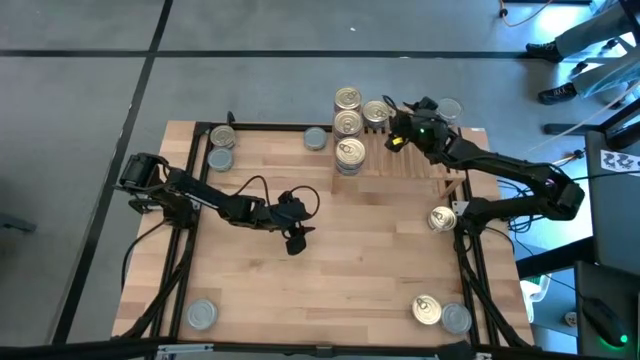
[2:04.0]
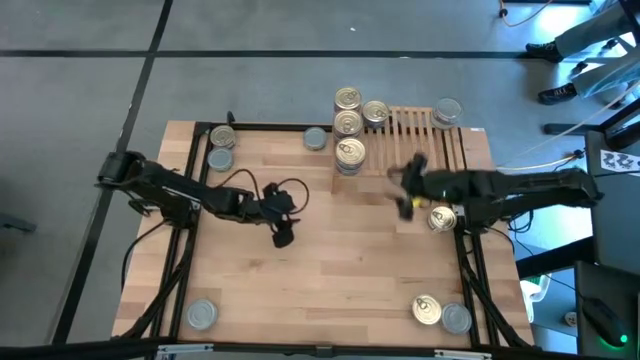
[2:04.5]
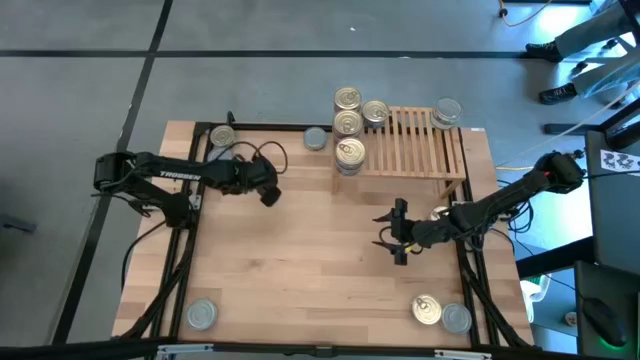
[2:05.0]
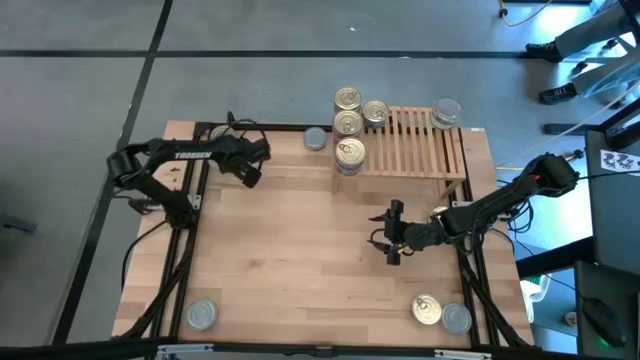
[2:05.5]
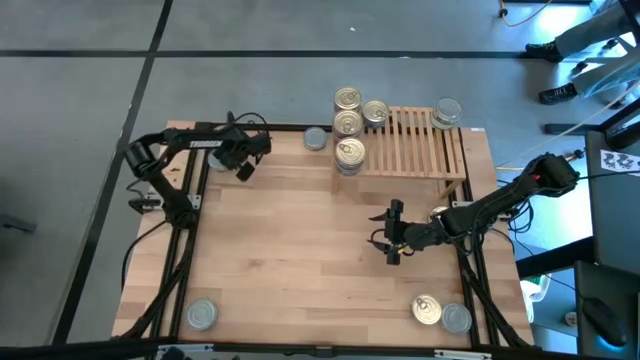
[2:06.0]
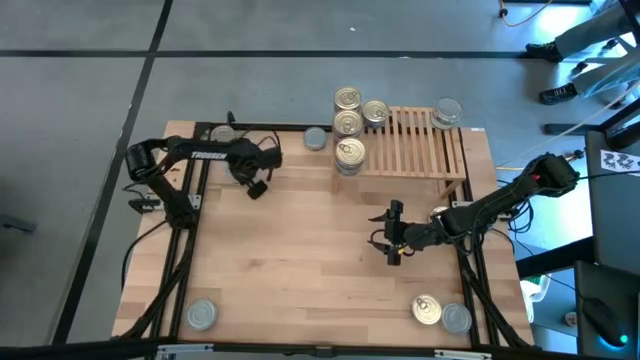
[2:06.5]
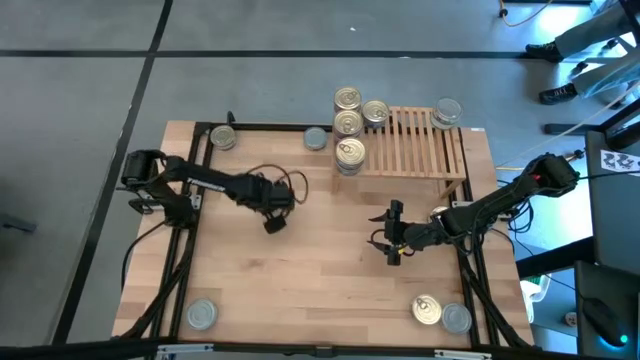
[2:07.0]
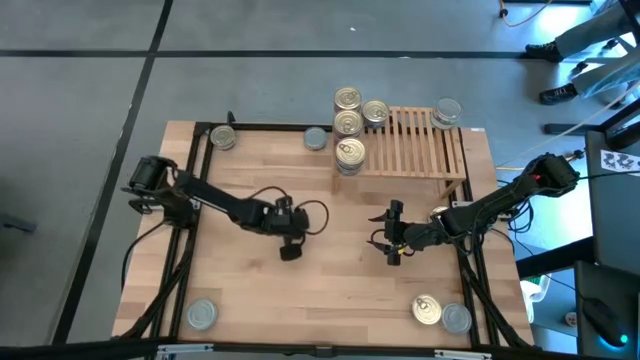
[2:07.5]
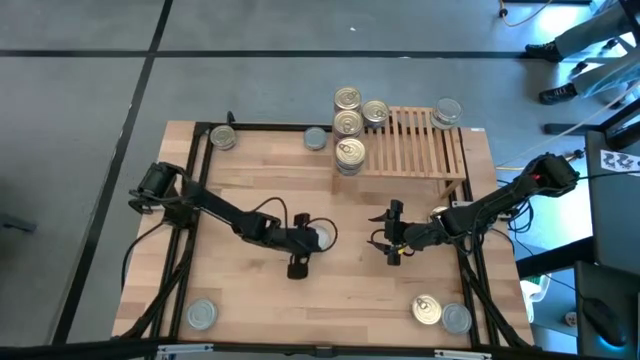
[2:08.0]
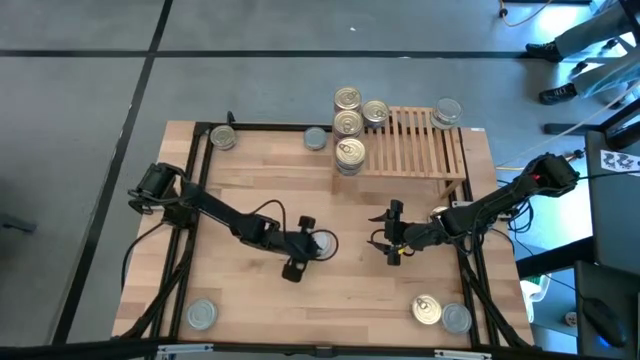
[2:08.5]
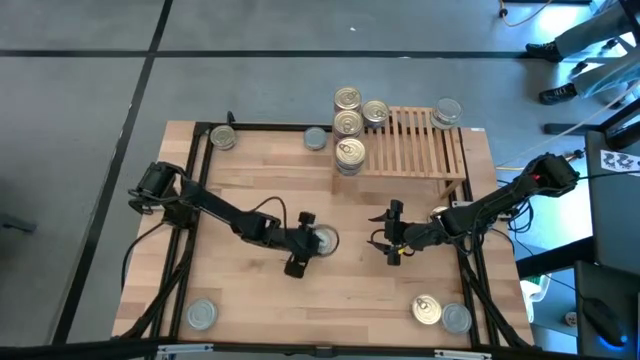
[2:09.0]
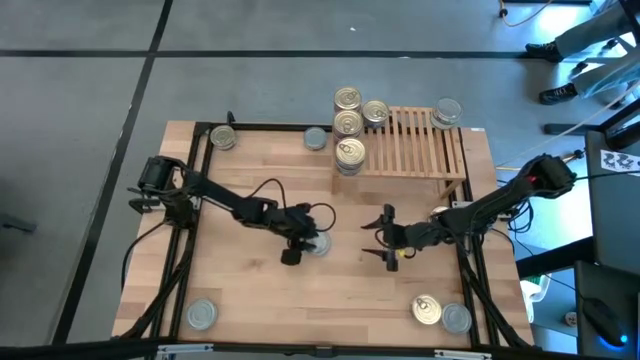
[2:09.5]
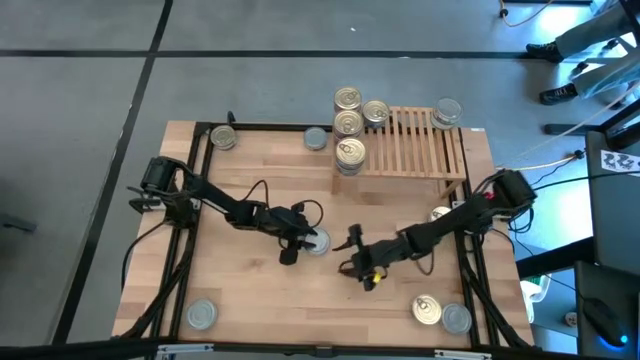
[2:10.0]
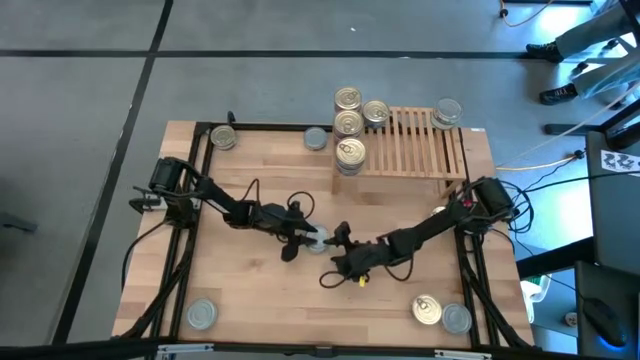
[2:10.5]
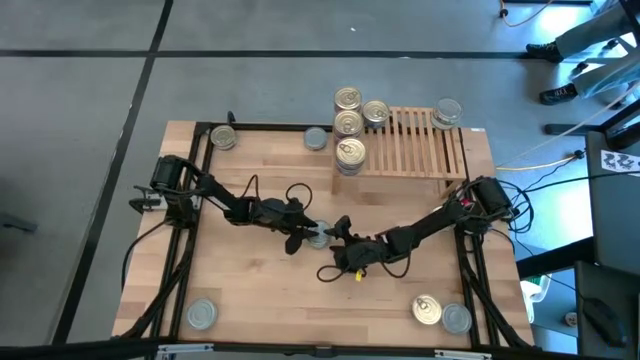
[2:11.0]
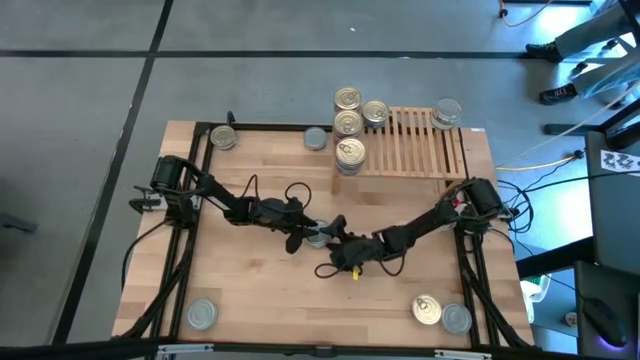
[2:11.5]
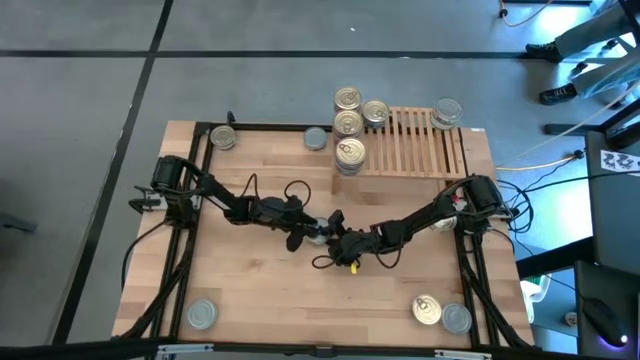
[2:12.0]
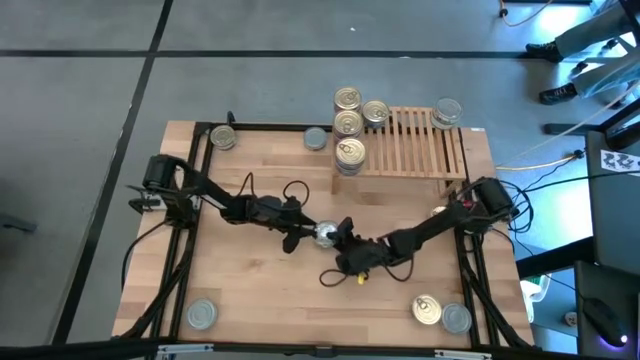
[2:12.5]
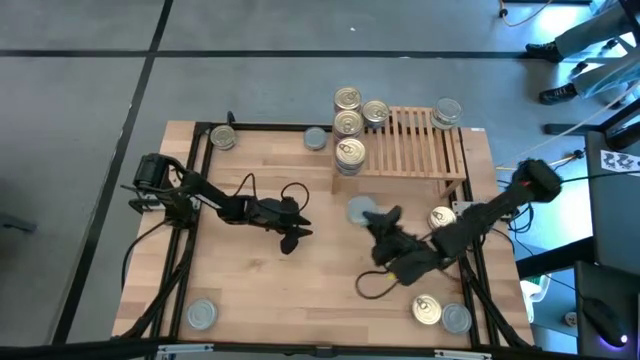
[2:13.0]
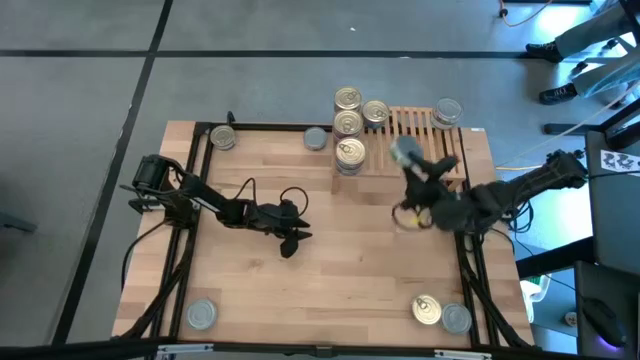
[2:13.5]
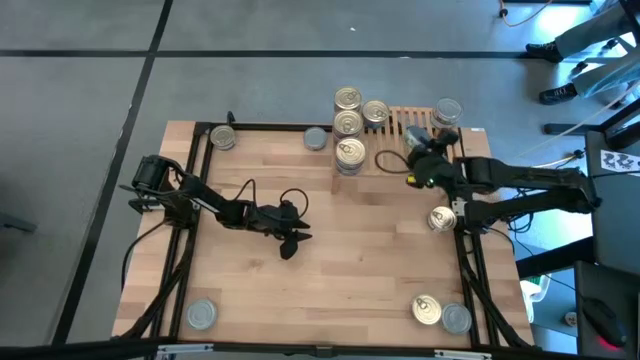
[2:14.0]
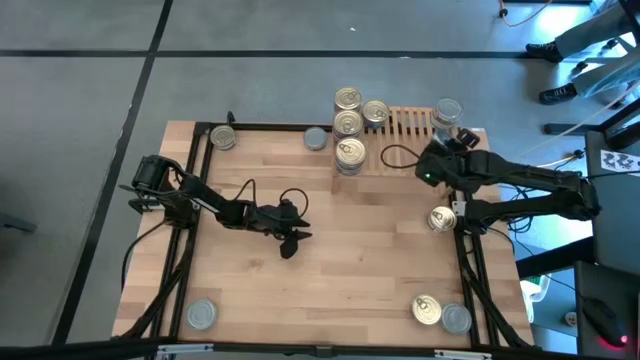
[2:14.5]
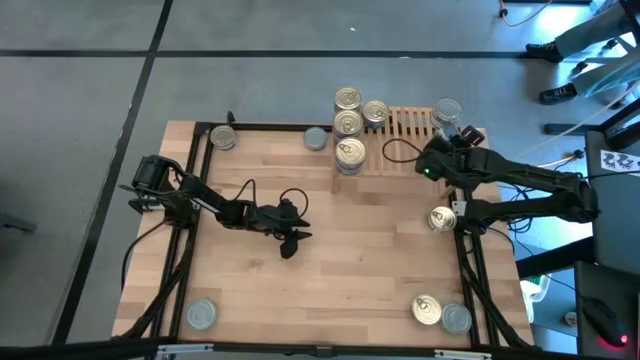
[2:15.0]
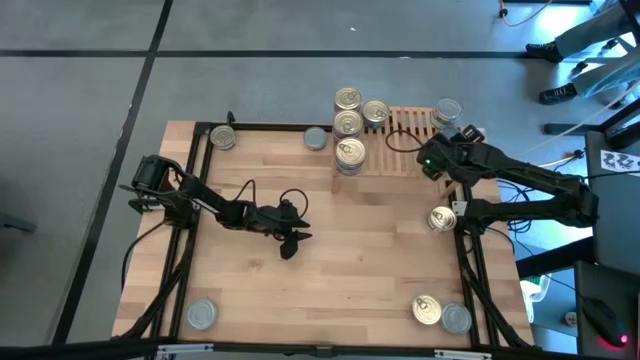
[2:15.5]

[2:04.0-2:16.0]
Task: Stack canned seafood by type on shelf
Put the green tuna can on the shelf aligned with the other green tuna can

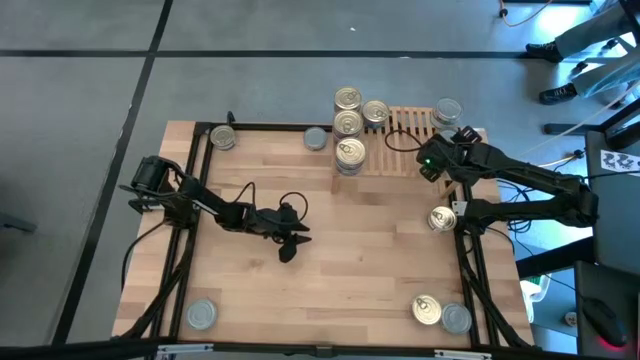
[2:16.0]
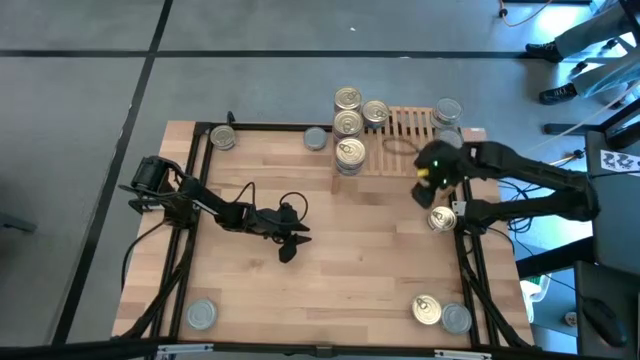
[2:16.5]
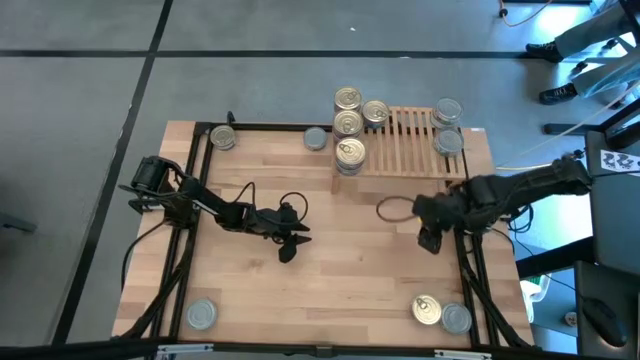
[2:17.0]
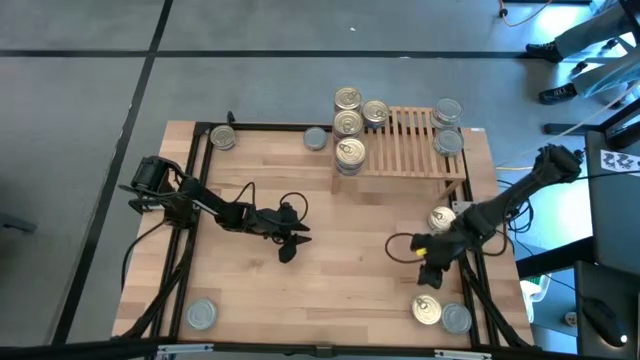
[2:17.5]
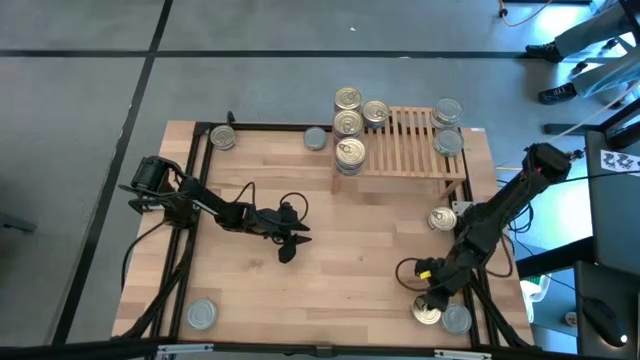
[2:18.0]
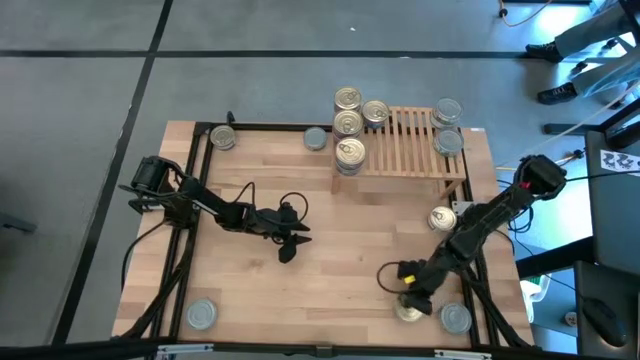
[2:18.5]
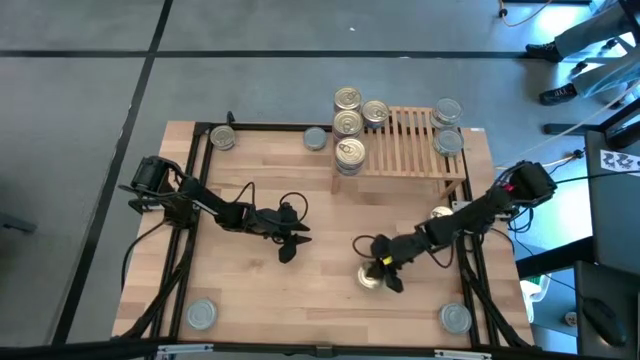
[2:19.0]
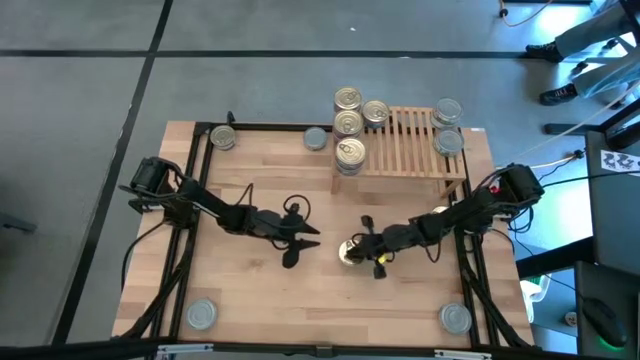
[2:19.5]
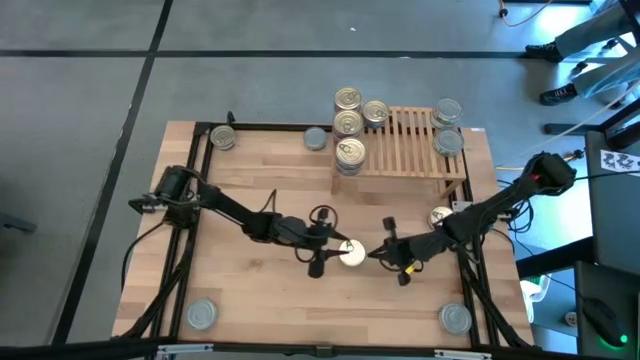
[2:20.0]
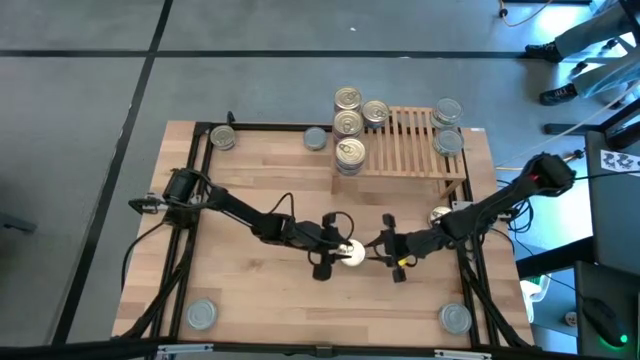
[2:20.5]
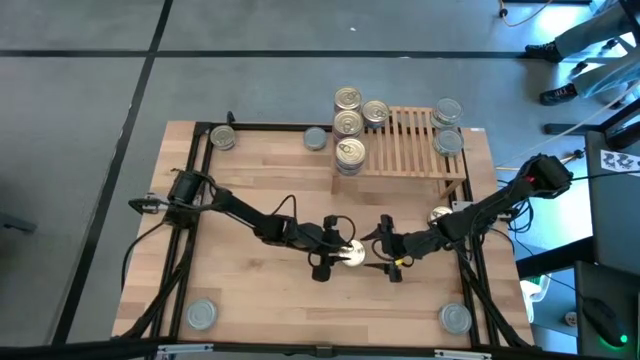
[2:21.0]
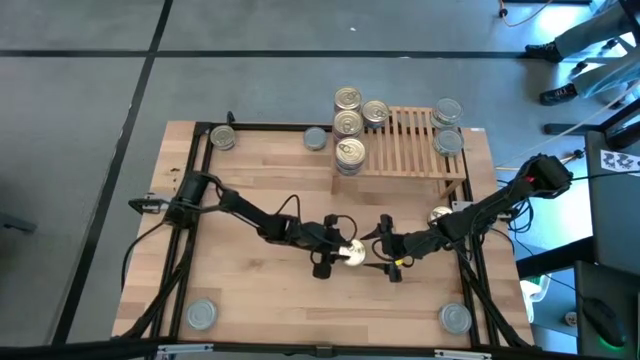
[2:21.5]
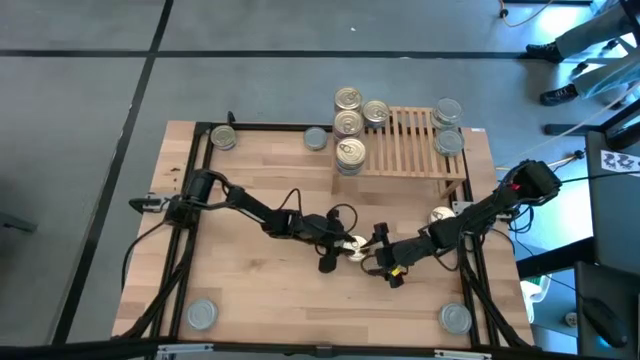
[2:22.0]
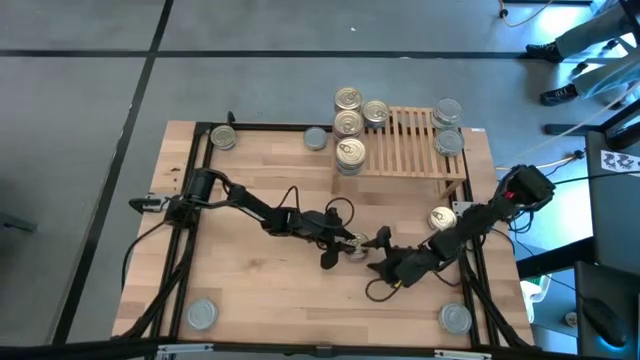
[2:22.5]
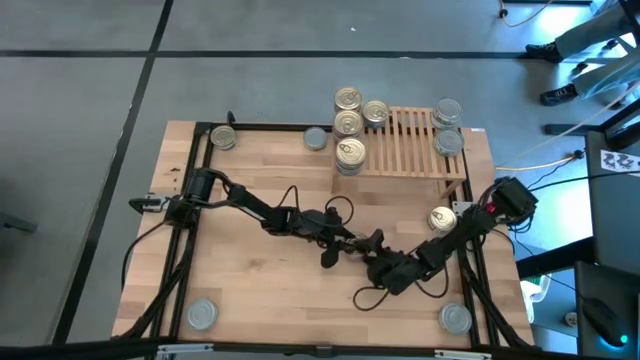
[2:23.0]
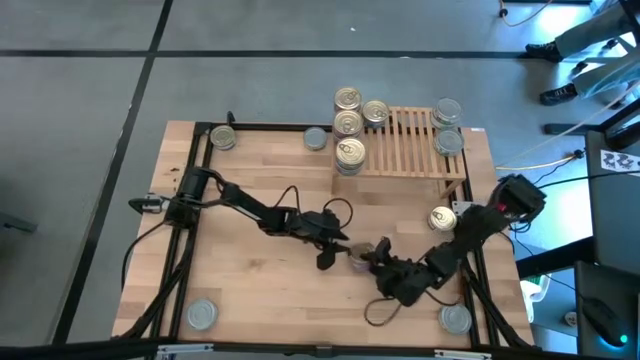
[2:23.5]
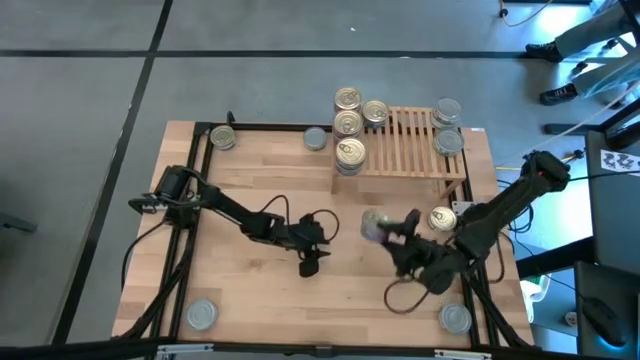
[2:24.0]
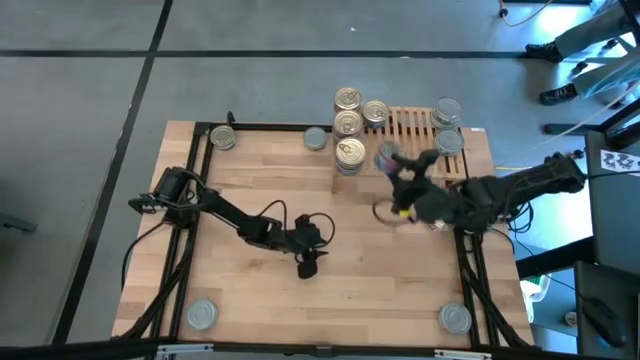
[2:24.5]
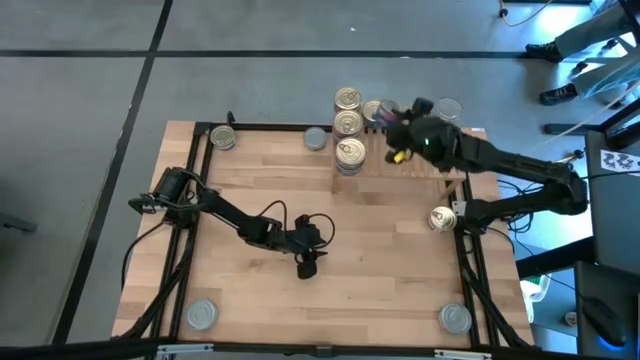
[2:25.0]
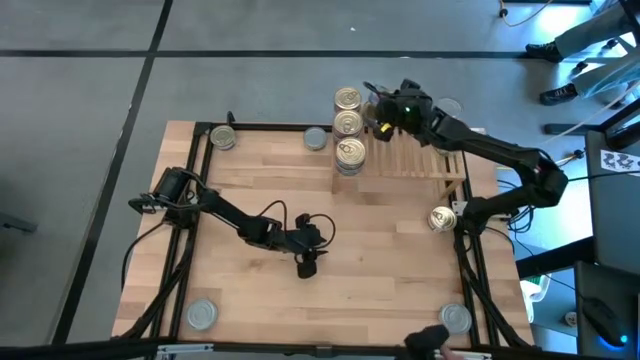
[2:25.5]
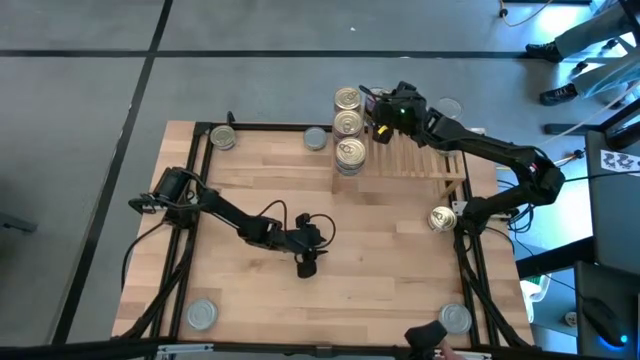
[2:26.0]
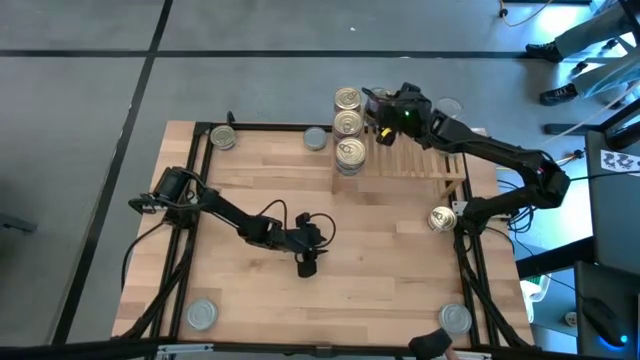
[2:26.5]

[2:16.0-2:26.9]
Stack the blue-pink tuna can on top of the blue-pink tuna can on the shelf
